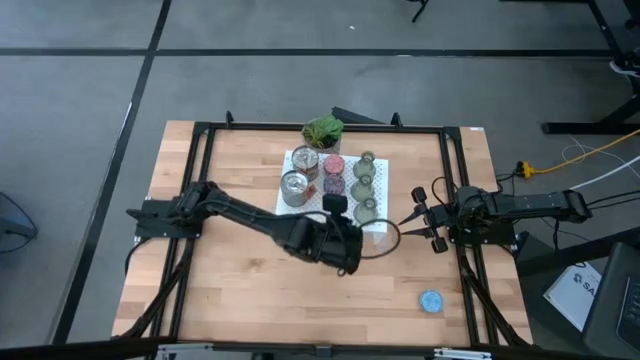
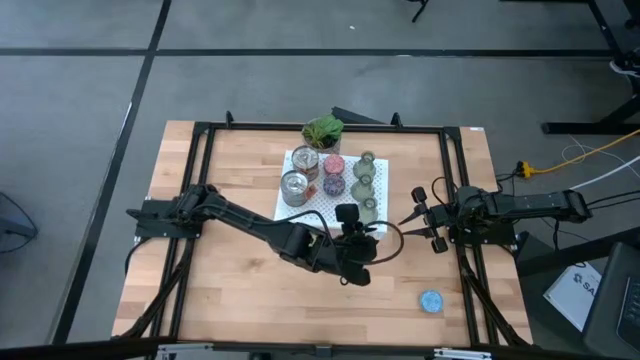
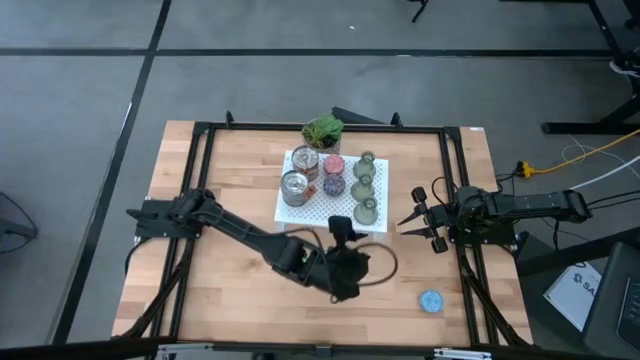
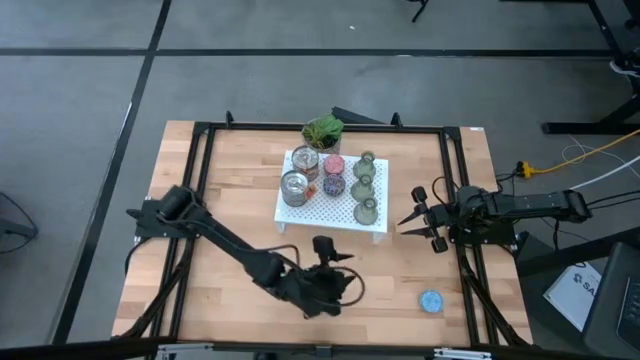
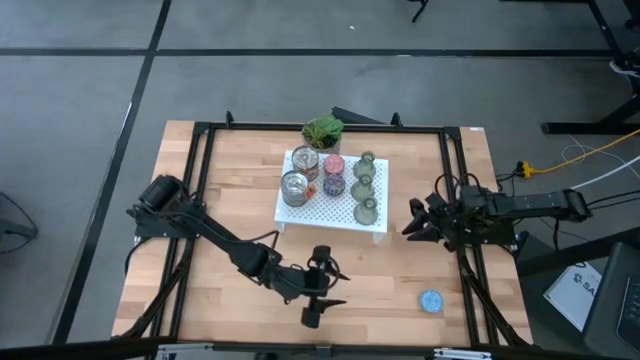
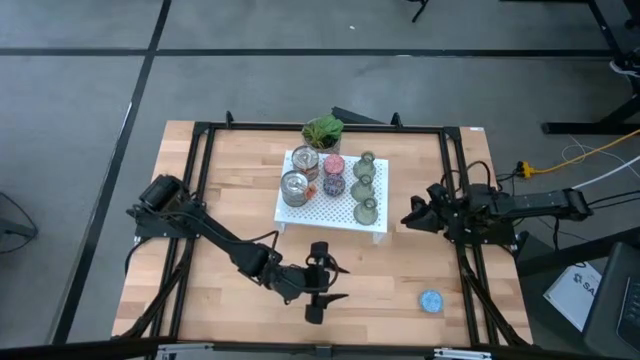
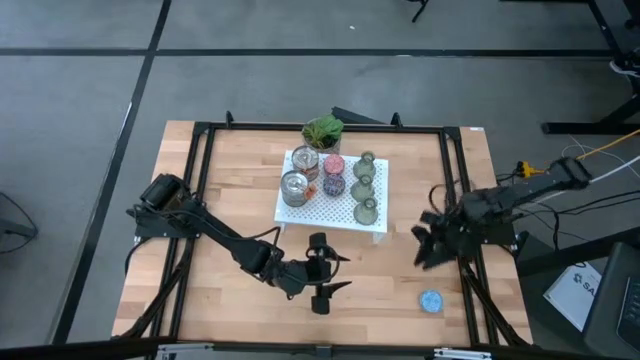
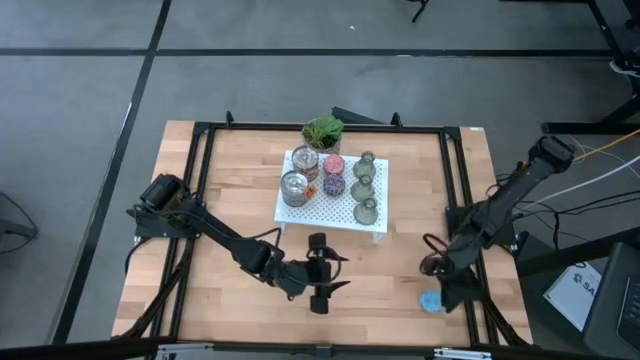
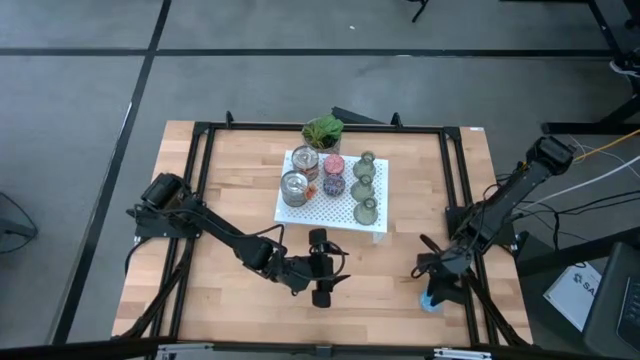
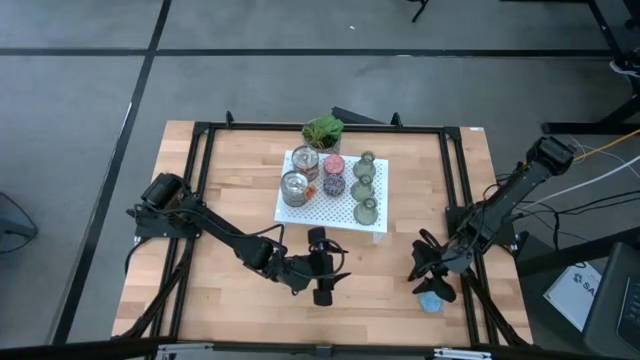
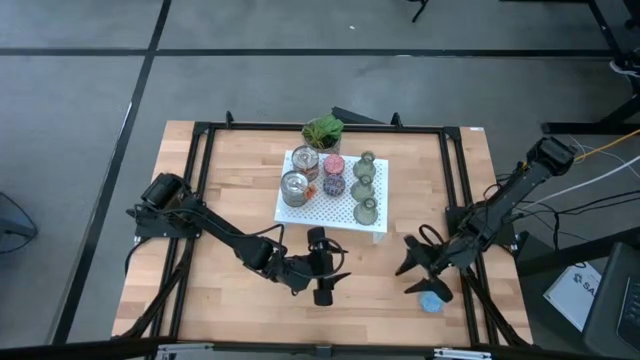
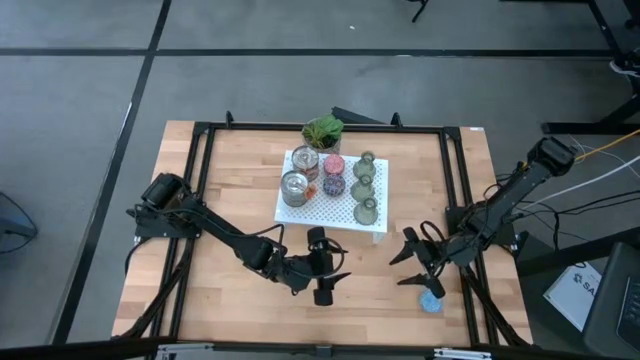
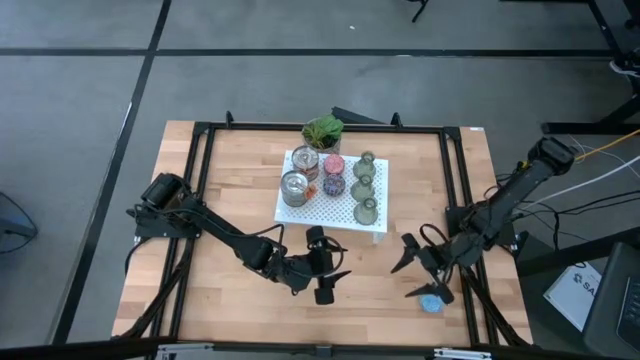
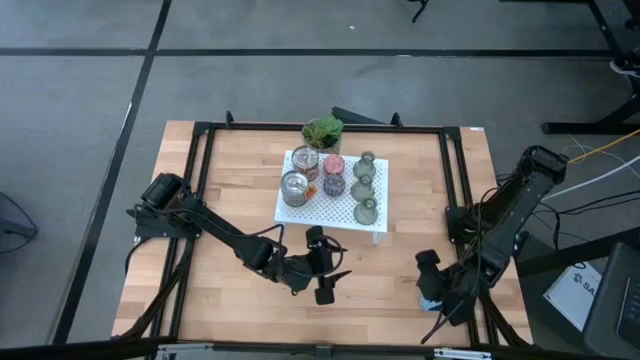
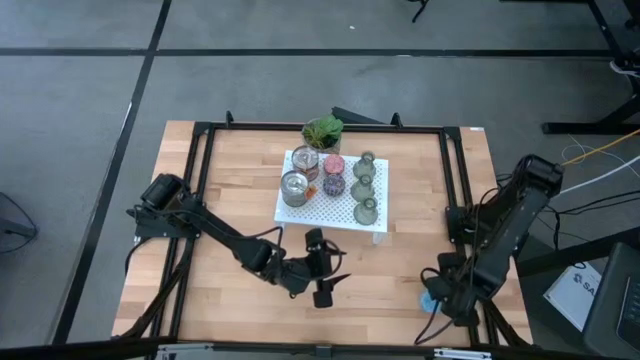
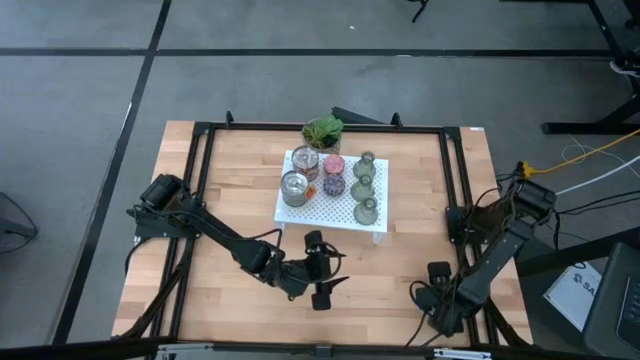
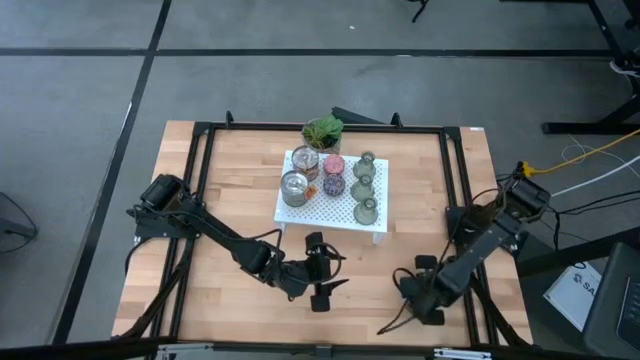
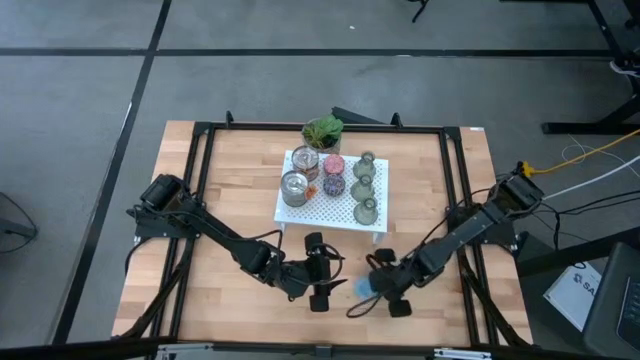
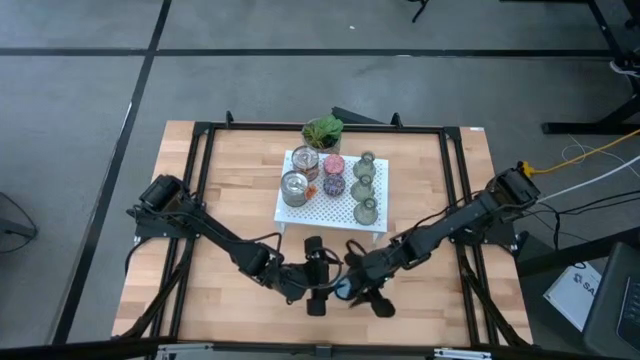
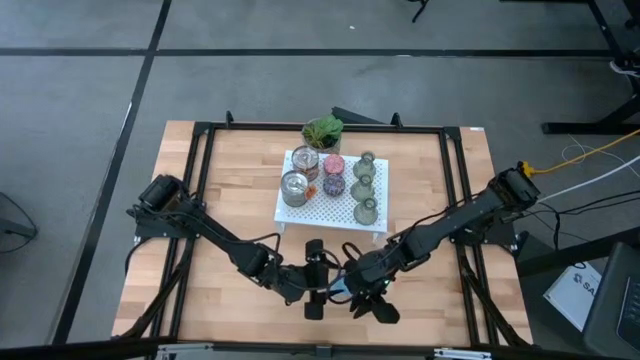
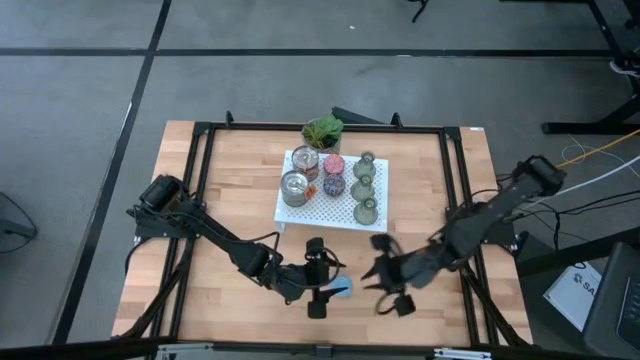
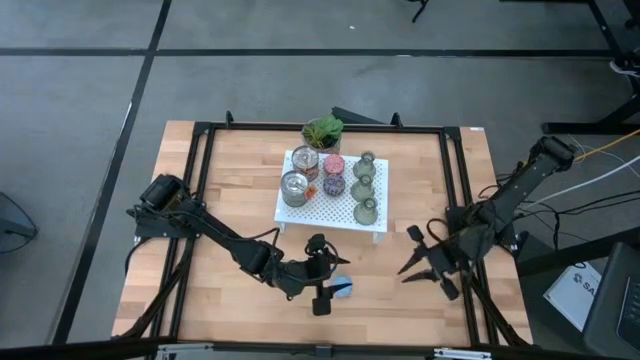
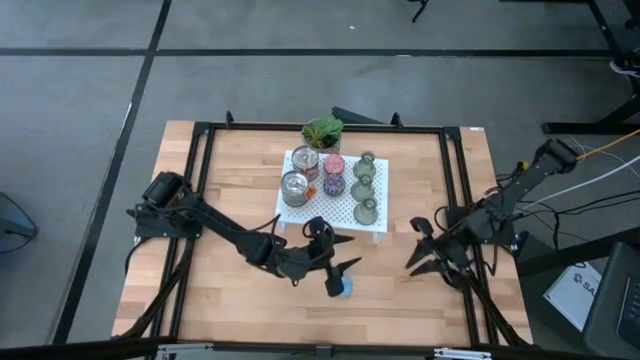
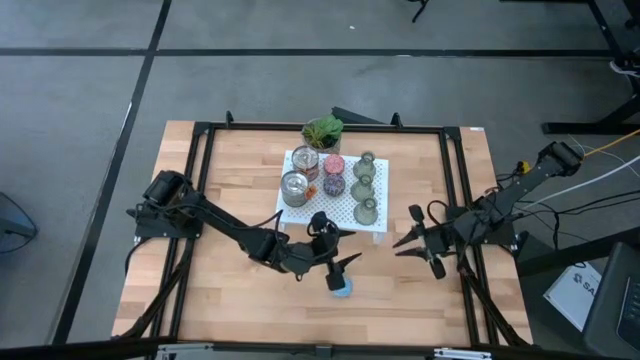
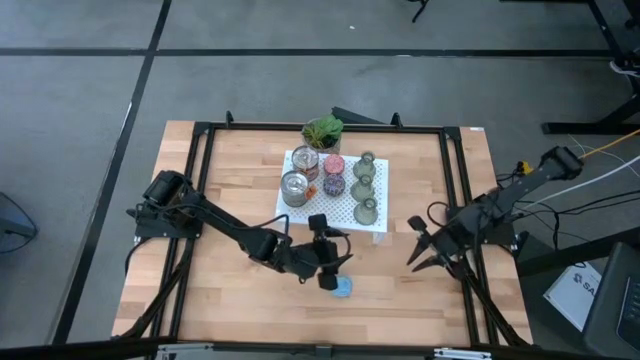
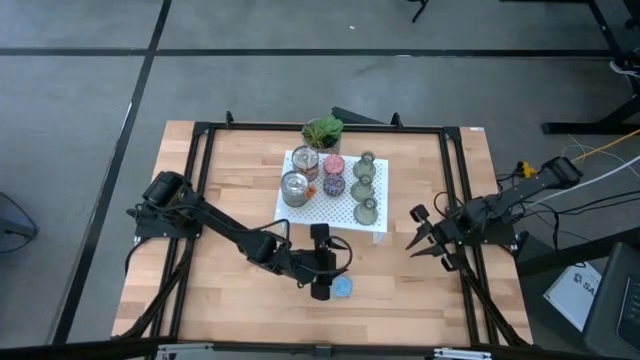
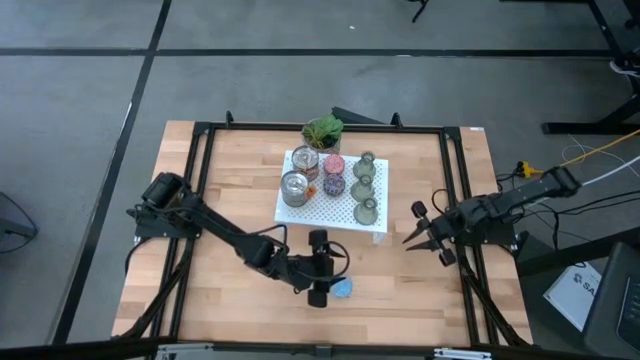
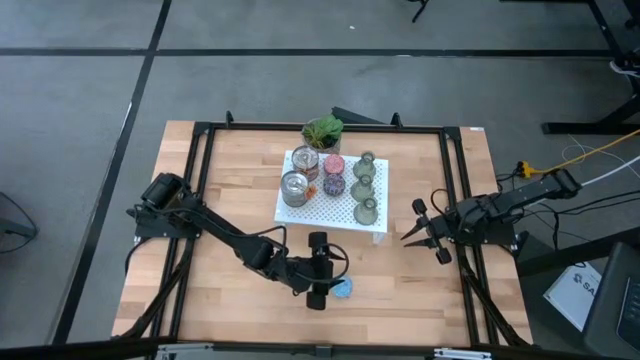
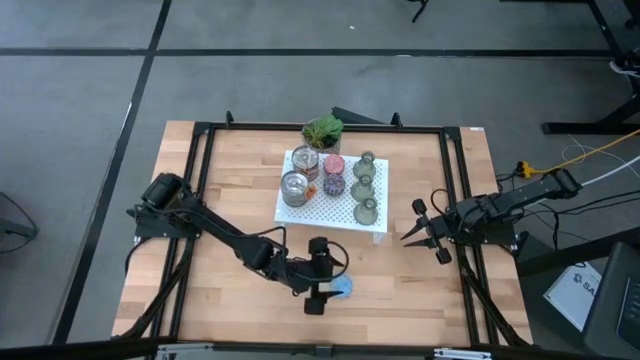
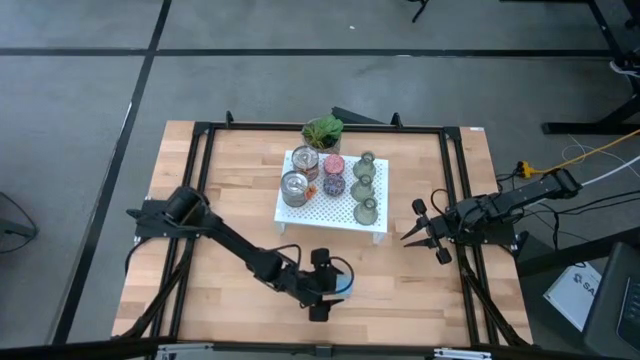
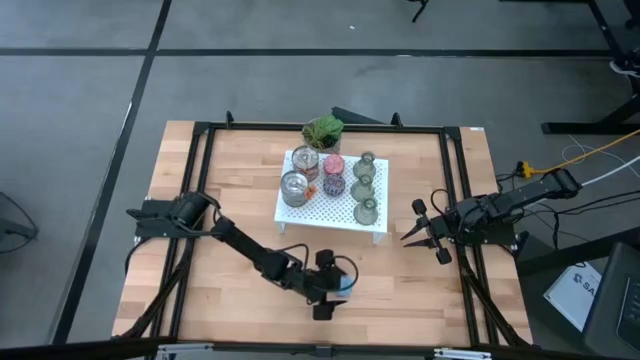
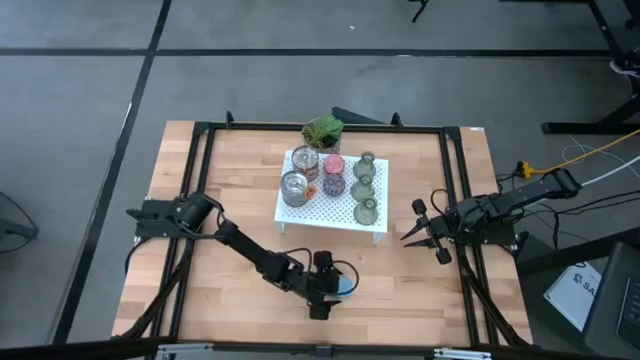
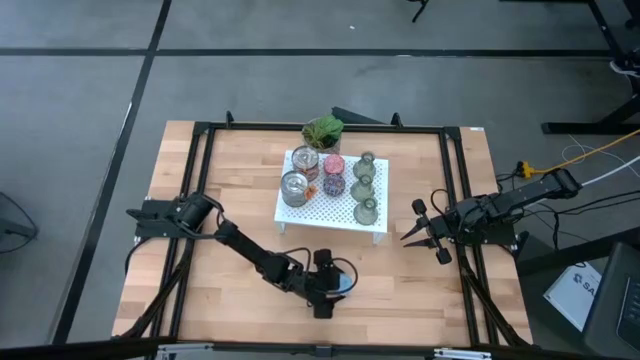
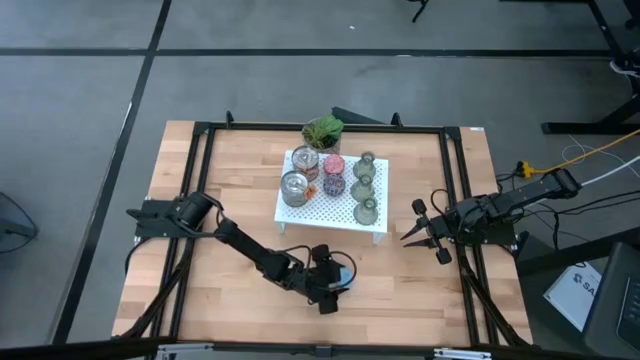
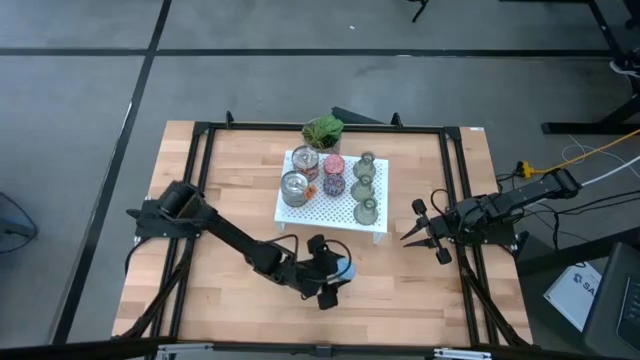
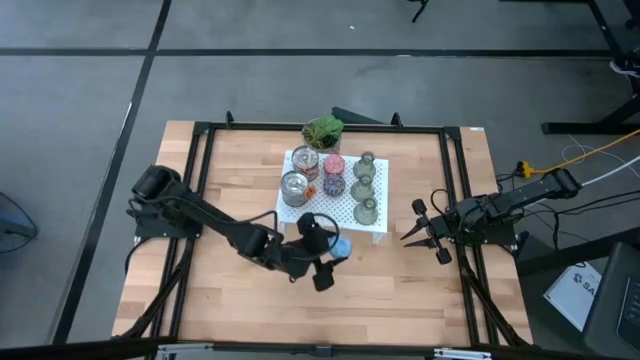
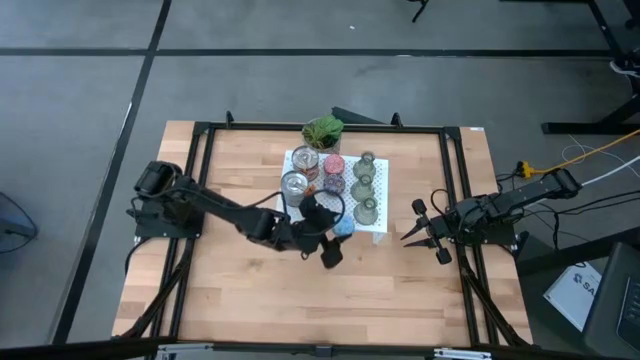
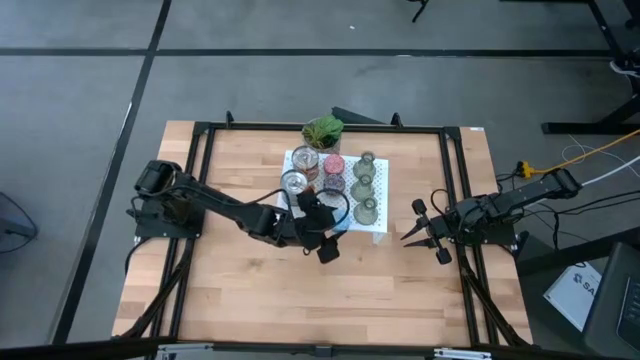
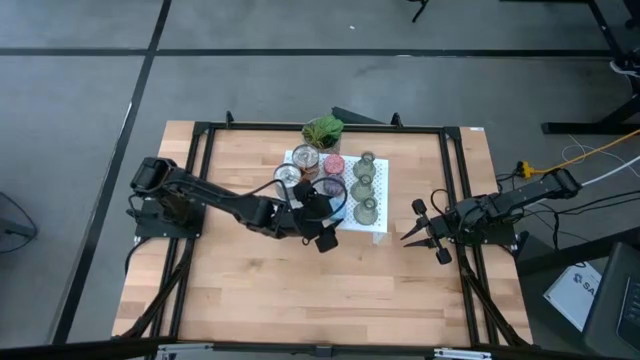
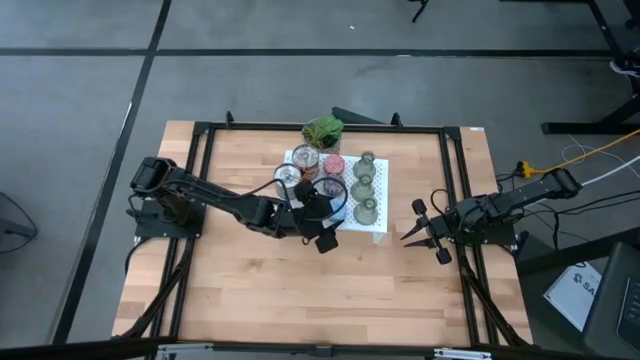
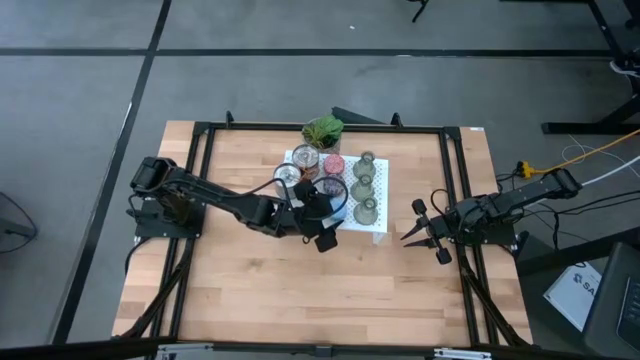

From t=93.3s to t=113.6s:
Task: Stock candles and vases on shelf
Align the blue patterned scented candle with the other scented candle on the shelf

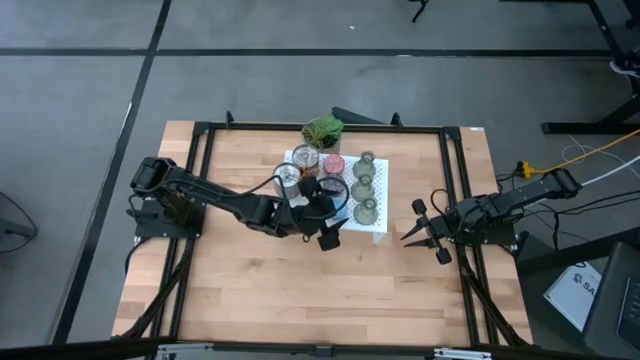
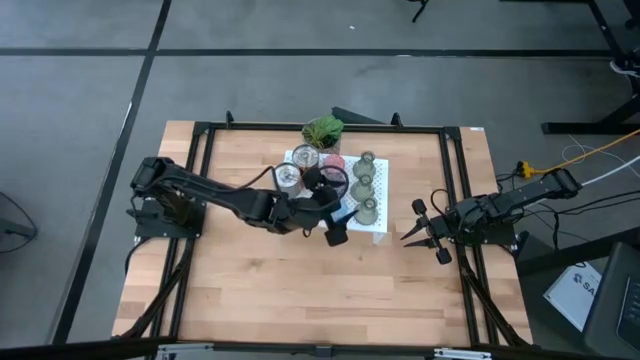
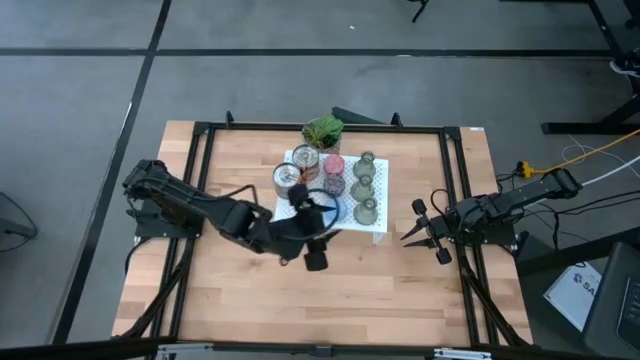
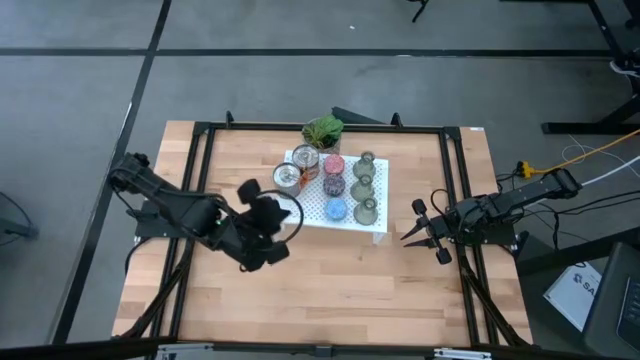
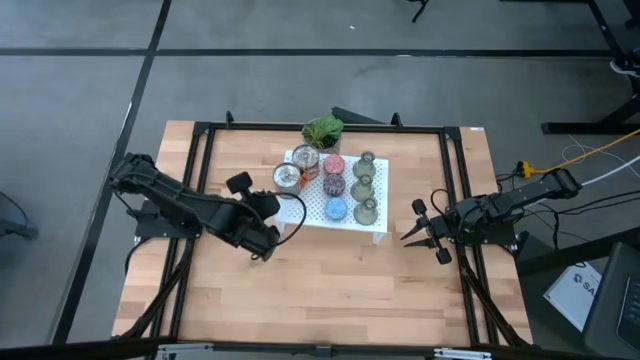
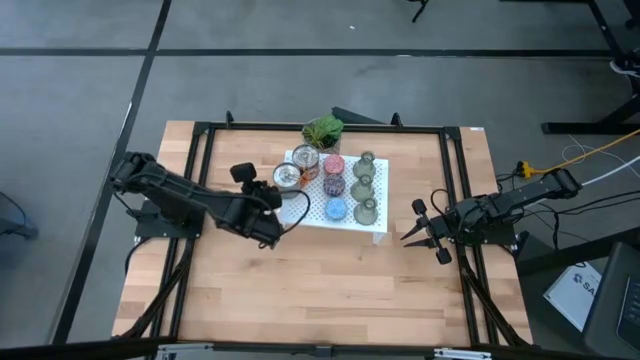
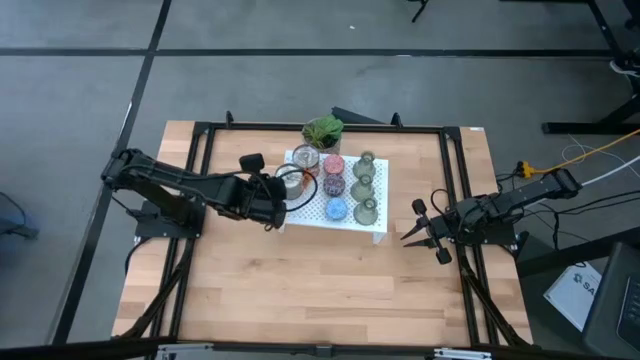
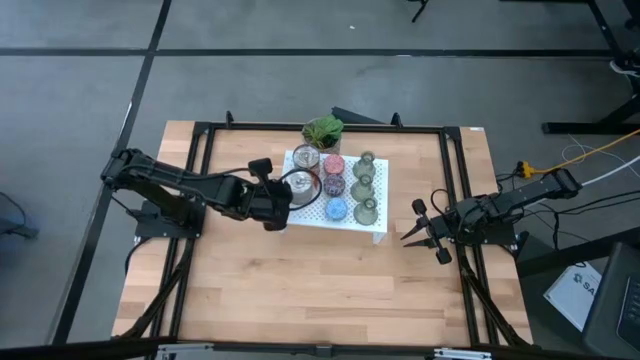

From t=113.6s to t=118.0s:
Adjust the scented candle on the shelf
